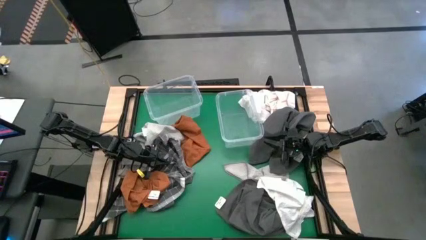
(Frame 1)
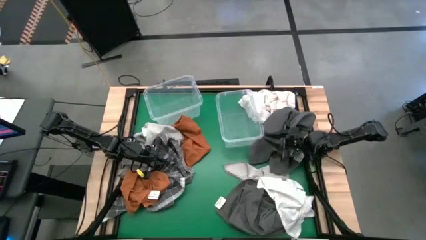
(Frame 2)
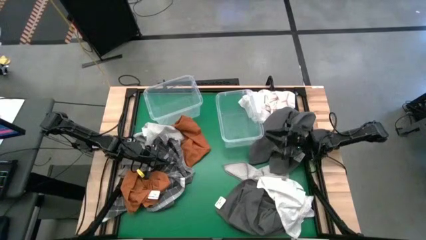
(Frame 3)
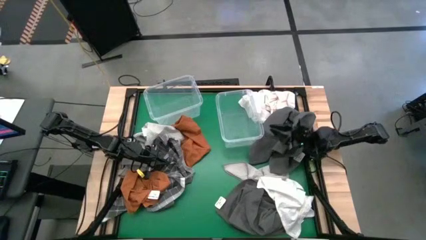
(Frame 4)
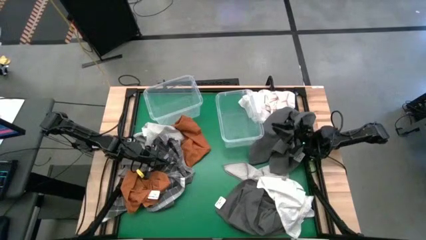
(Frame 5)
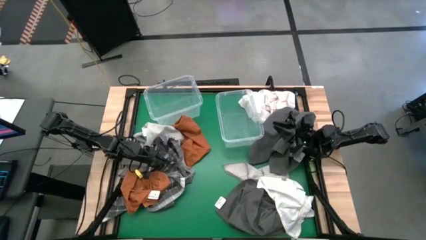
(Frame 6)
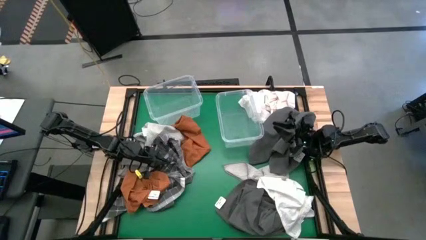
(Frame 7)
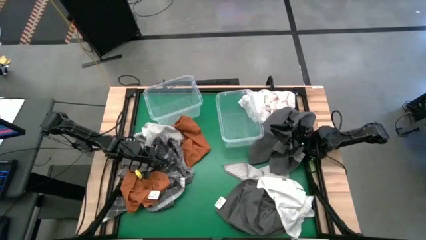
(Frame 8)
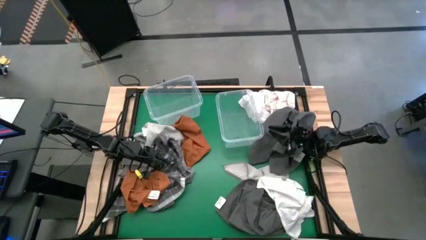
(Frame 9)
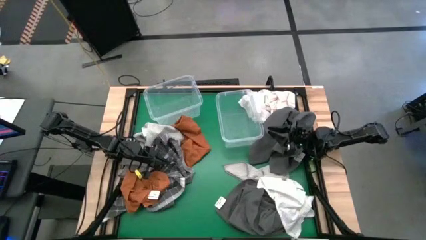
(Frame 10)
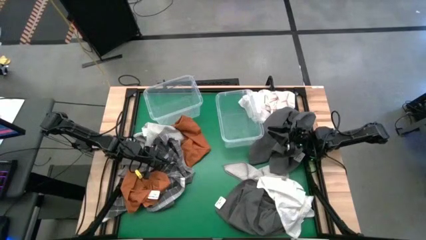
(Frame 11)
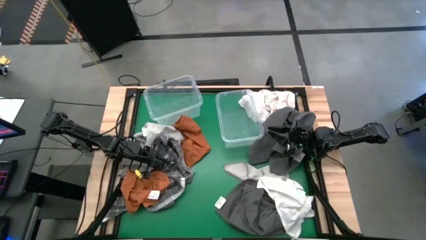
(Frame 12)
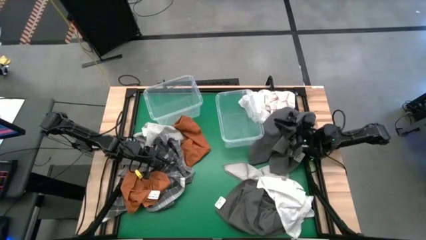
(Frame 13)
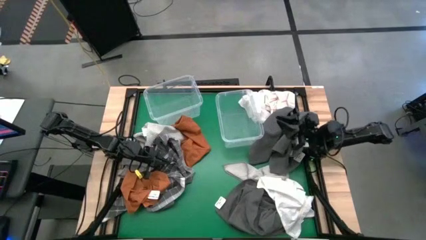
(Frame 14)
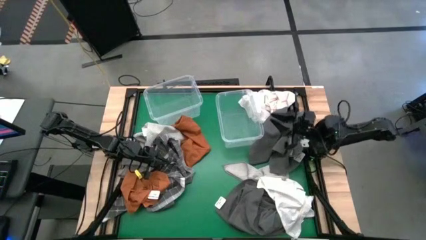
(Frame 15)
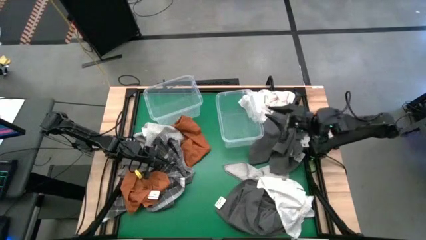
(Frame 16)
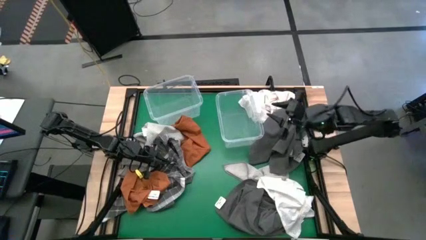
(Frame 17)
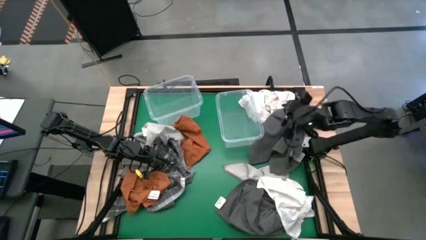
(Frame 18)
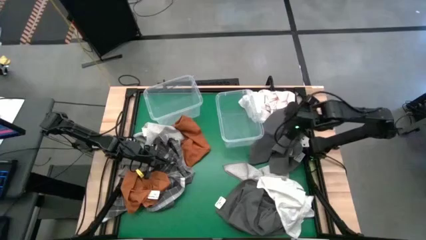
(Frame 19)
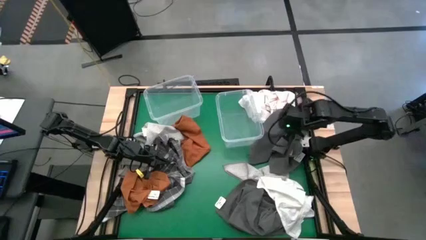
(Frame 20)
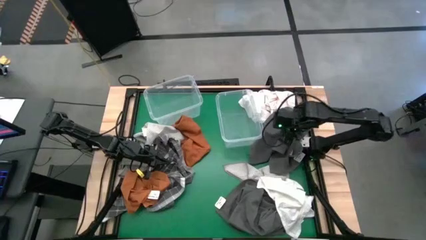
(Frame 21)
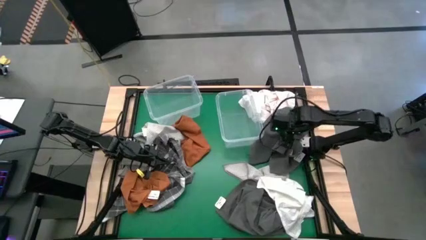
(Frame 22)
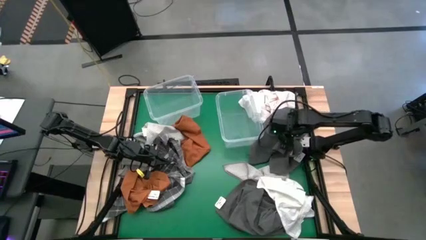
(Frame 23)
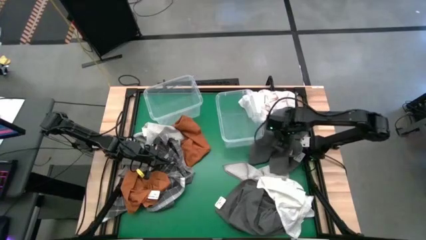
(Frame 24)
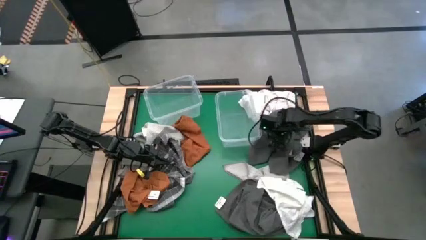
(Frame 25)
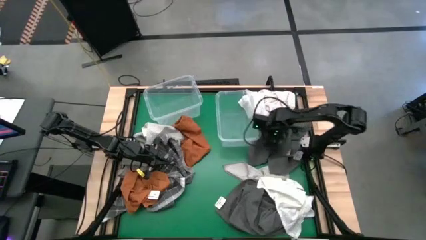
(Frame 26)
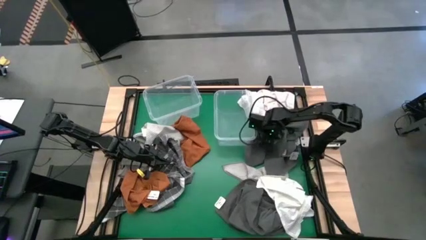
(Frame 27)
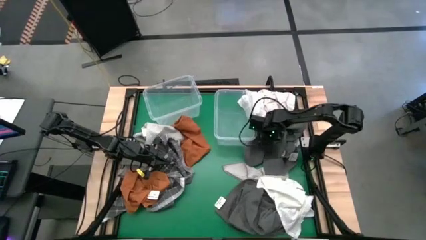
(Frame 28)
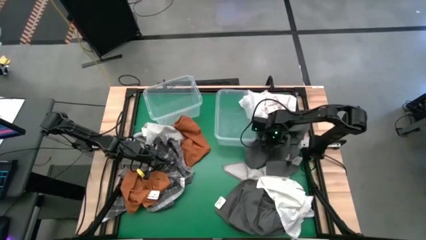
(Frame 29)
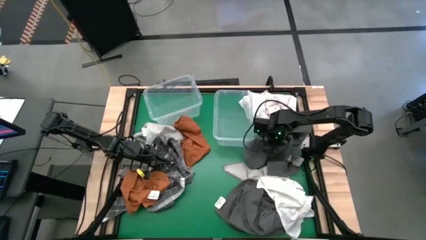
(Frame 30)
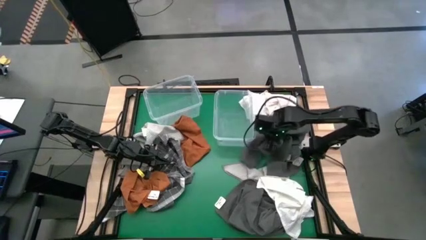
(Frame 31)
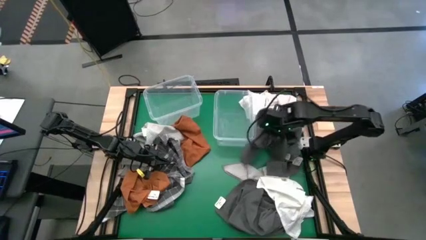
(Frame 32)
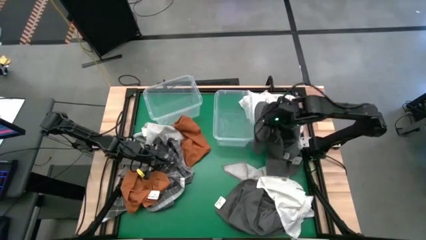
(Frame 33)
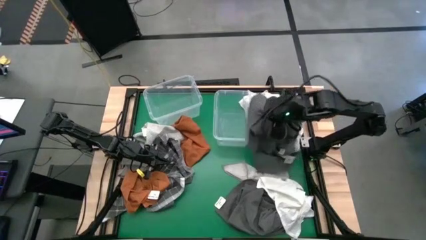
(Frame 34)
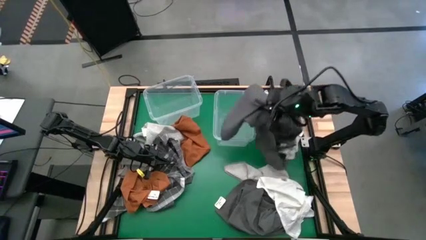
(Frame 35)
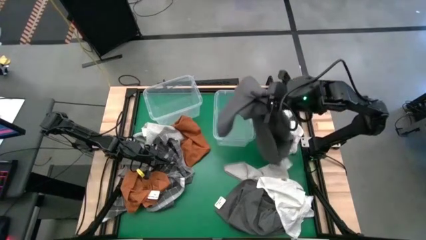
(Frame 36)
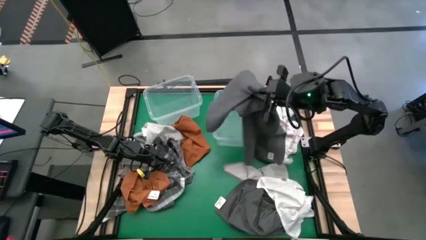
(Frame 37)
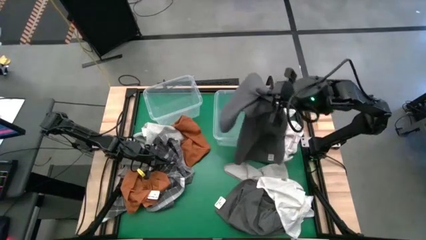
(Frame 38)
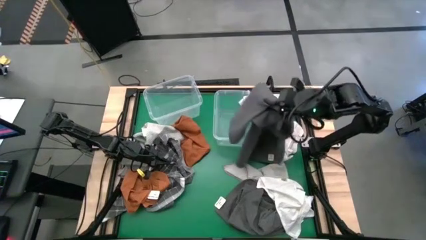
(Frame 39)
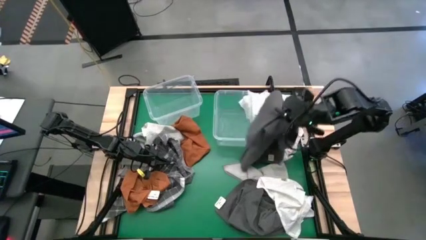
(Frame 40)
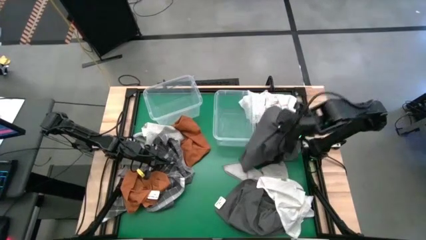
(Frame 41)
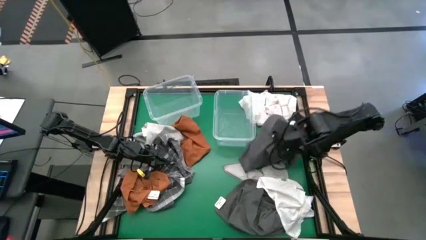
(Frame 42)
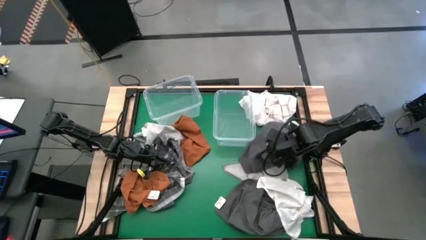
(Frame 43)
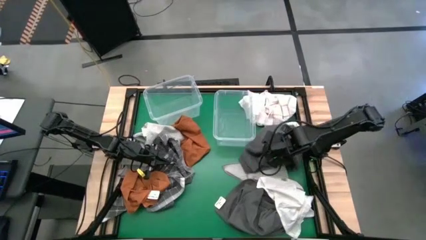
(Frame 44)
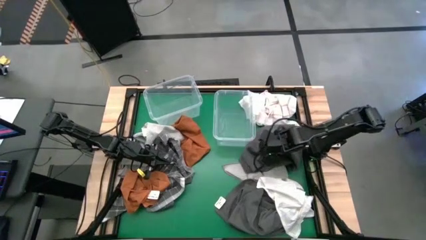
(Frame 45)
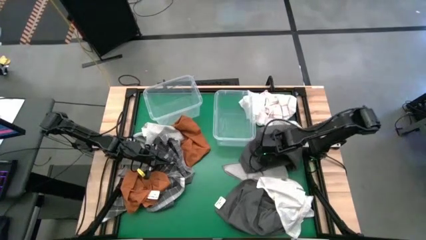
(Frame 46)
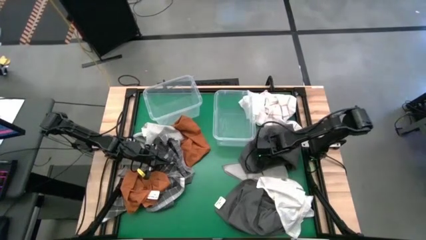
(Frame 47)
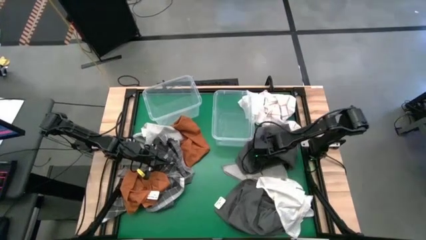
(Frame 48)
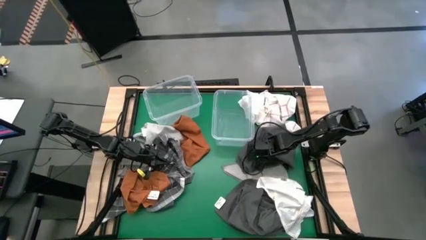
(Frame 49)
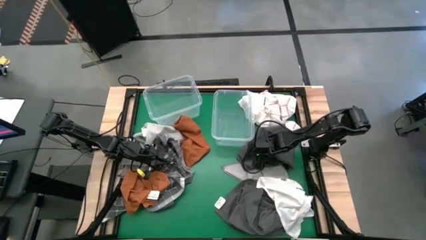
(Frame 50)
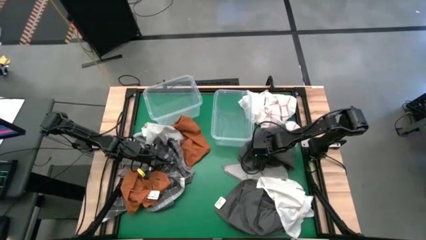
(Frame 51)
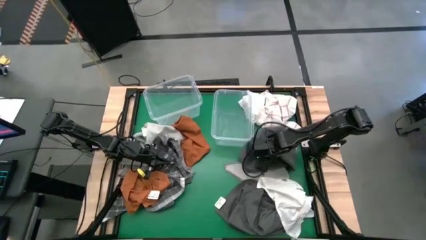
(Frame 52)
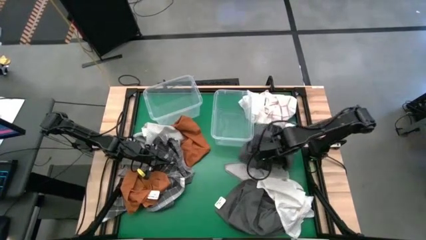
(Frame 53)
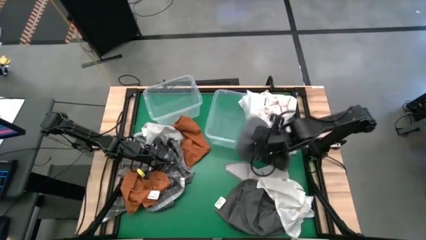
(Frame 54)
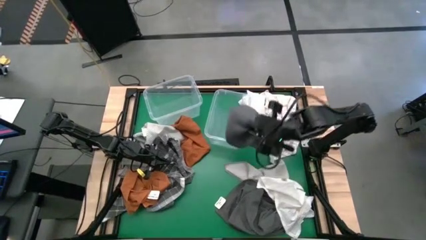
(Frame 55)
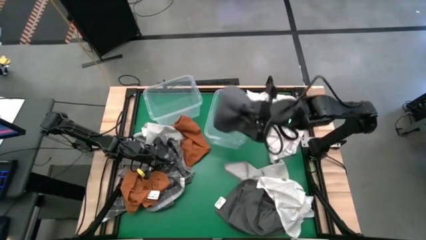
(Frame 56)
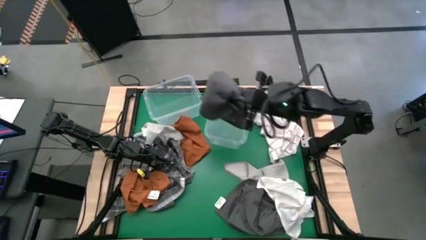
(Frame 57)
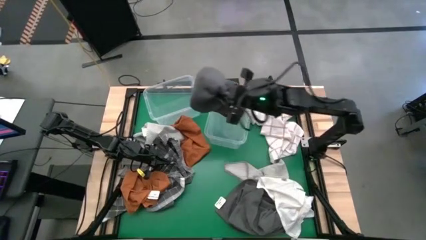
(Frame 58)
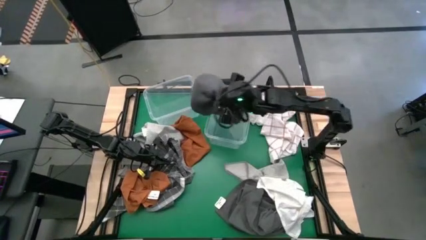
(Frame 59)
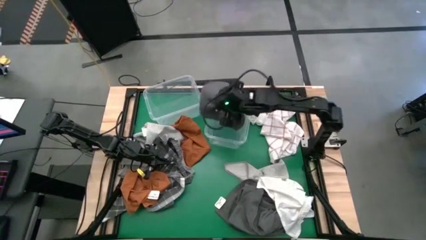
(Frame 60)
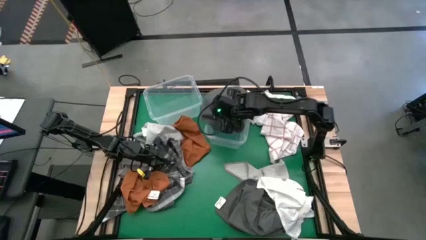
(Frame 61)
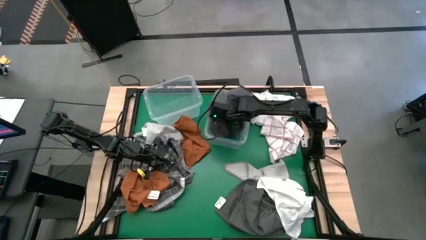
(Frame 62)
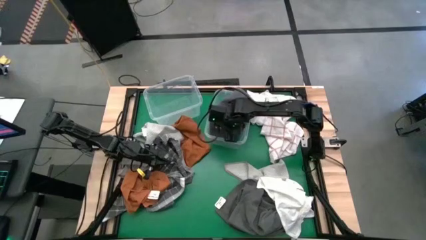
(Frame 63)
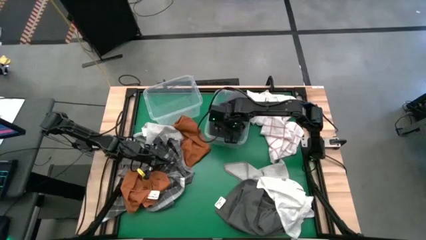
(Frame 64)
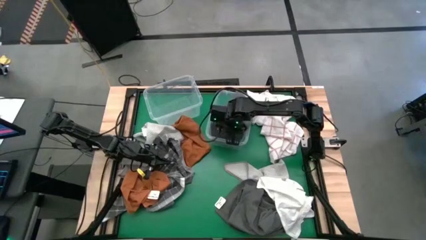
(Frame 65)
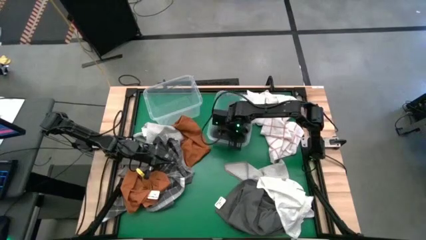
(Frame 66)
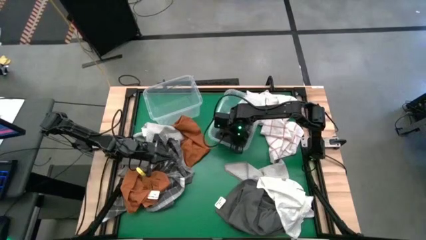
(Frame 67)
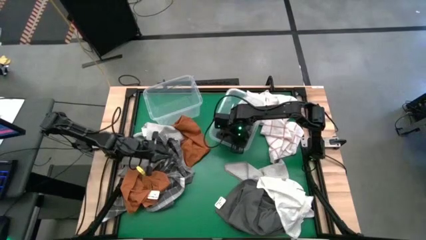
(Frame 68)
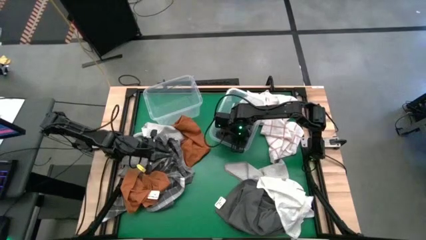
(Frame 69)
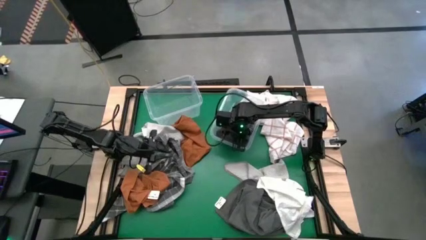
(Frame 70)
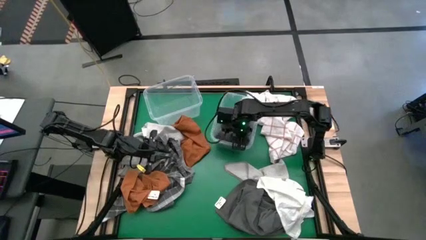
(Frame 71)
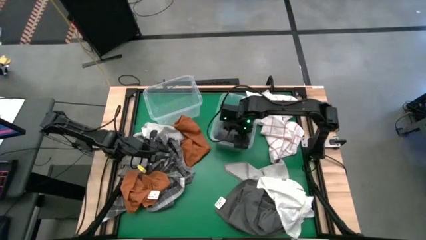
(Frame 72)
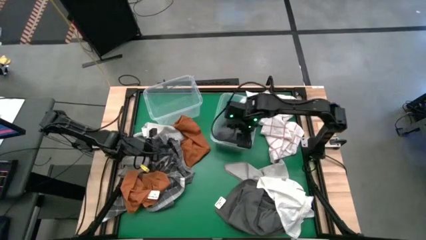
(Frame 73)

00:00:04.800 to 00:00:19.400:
Task: Sort towels by color in basket
Put the top dark gray towel into the right transparent bin

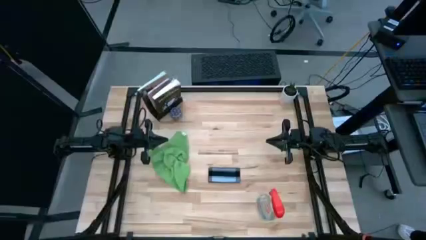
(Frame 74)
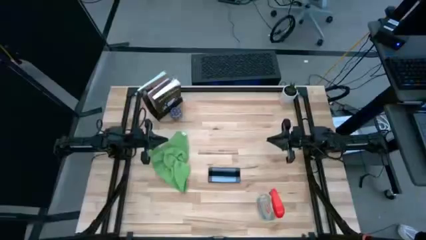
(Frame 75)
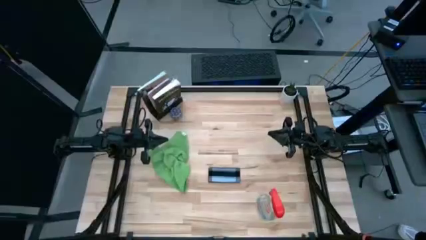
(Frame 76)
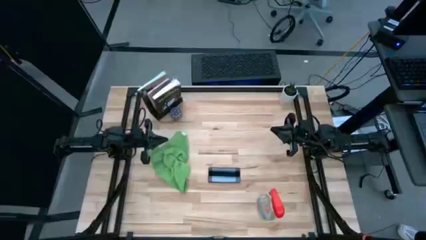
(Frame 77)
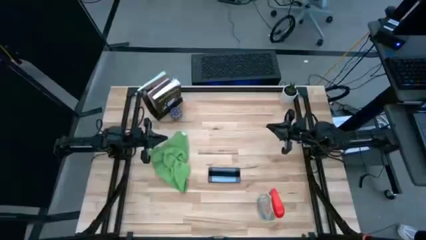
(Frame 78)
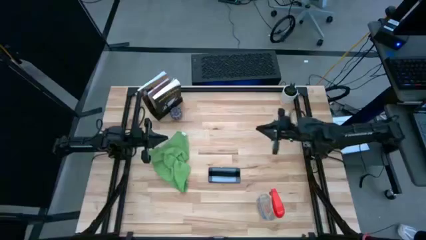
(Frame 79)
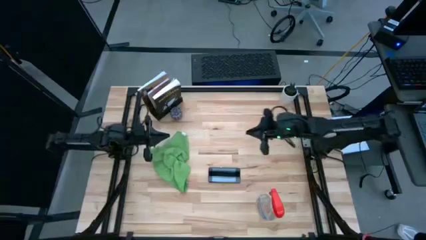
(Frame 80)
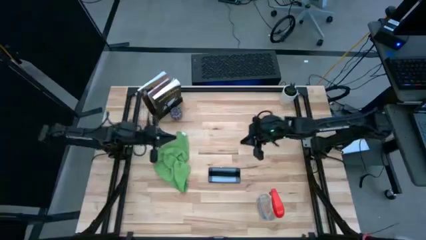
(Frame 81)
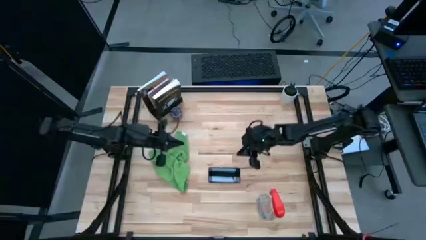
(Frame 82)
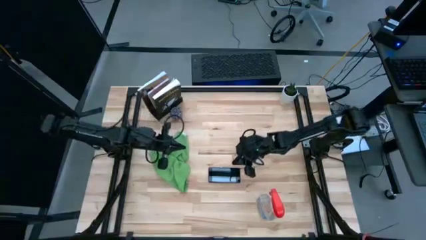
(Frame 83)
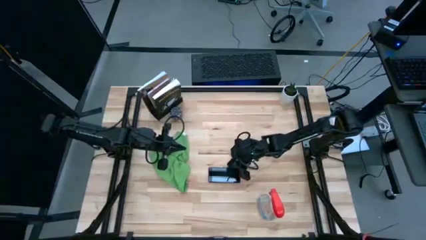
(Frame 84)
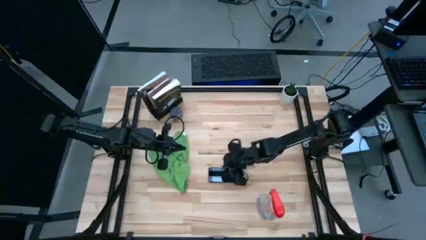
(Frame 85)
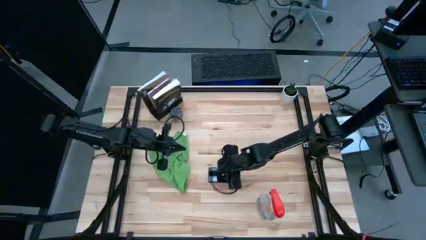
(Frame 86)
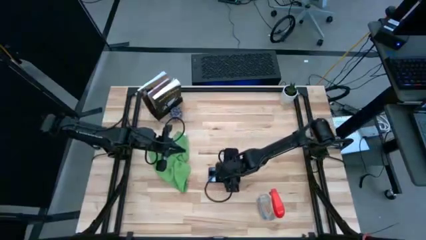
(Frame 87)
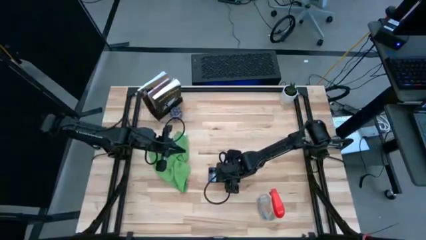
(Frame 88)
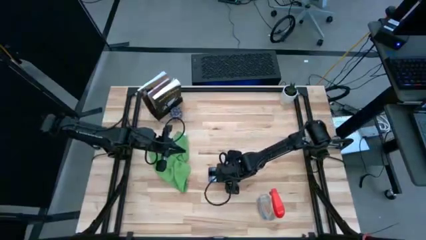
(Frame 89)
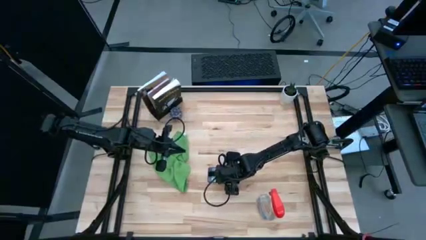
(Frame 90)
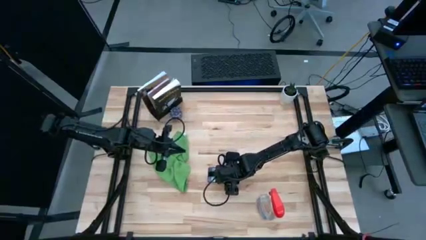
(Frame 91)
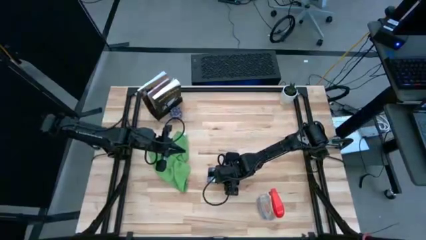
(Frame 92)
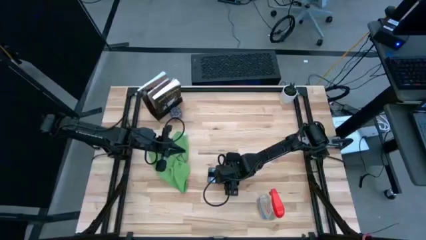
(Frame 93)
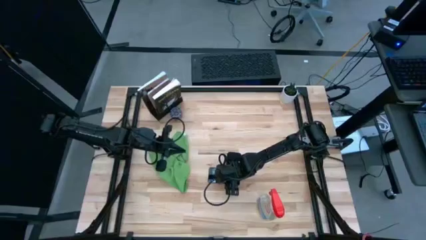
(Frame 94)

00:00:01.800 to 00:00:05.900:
Task: Apply microfiber cloth
Spray the front of the pink cellphone with the red spray bottle
